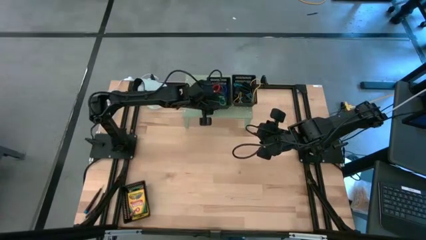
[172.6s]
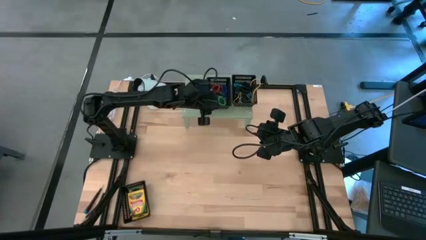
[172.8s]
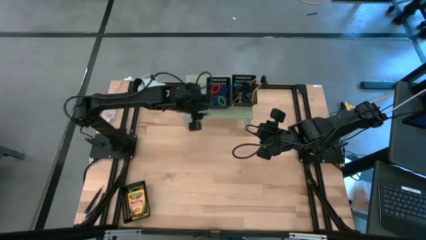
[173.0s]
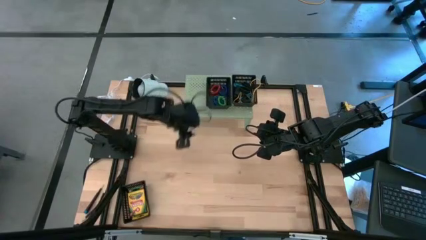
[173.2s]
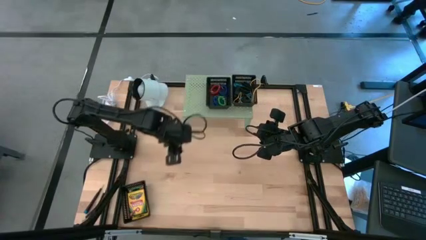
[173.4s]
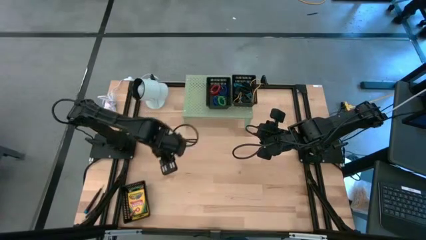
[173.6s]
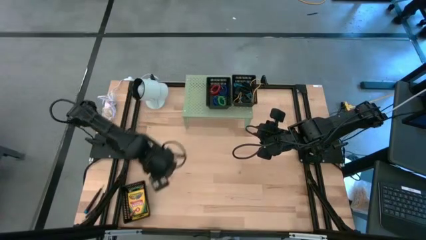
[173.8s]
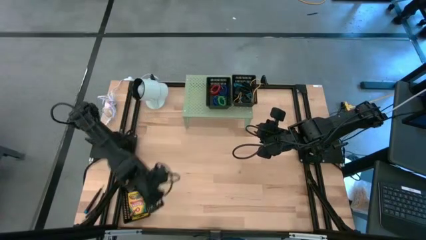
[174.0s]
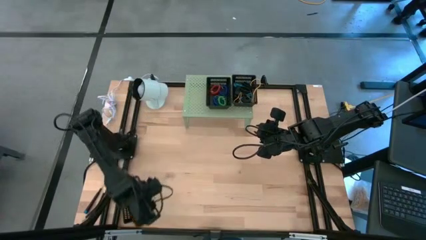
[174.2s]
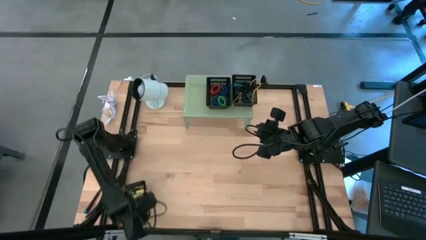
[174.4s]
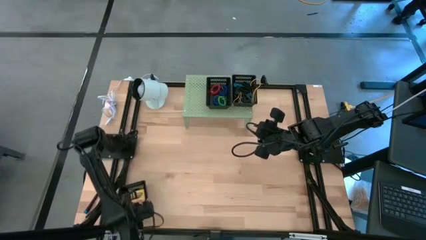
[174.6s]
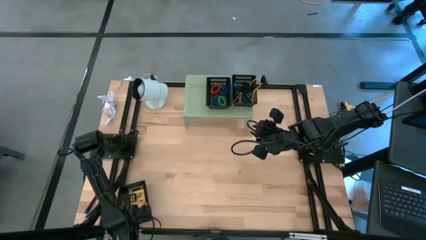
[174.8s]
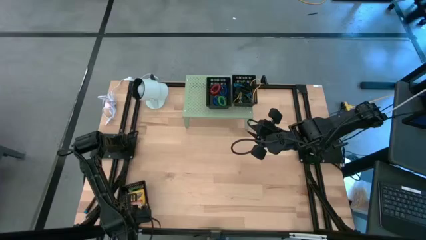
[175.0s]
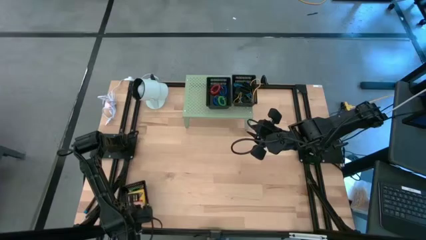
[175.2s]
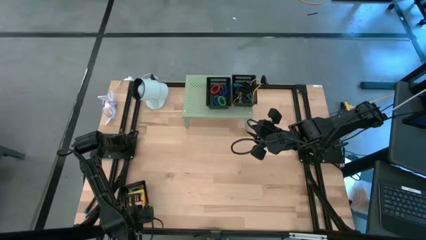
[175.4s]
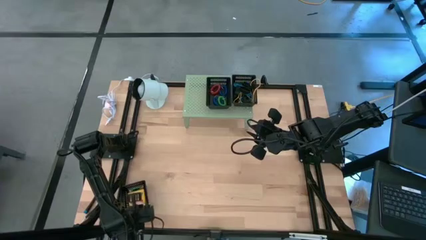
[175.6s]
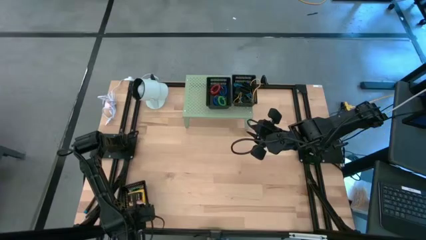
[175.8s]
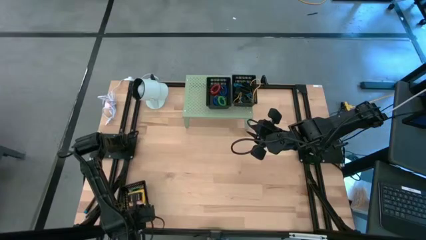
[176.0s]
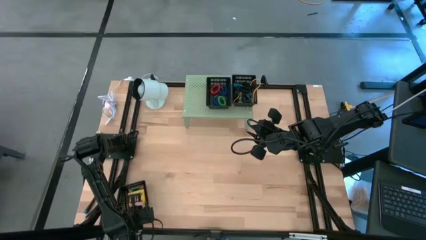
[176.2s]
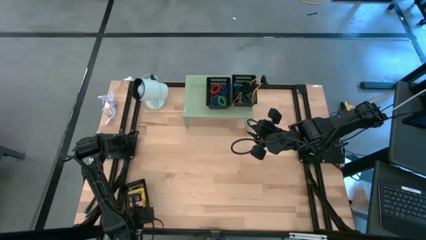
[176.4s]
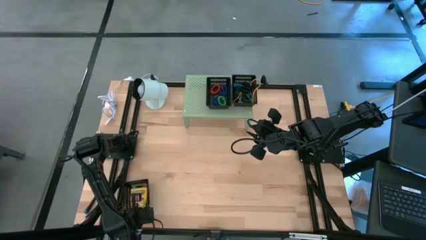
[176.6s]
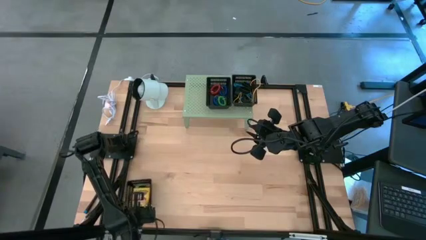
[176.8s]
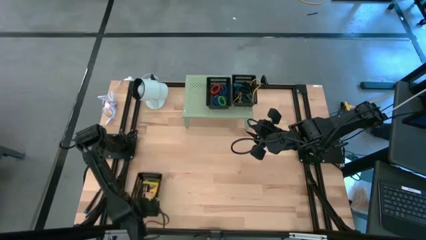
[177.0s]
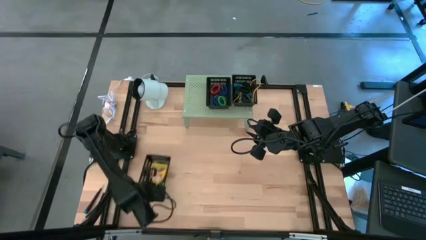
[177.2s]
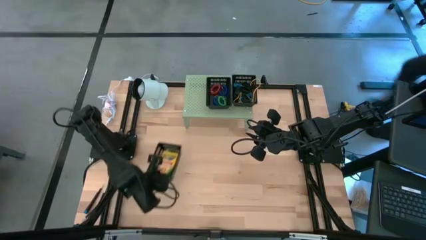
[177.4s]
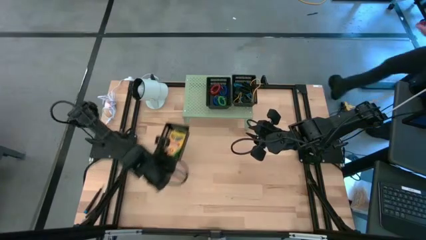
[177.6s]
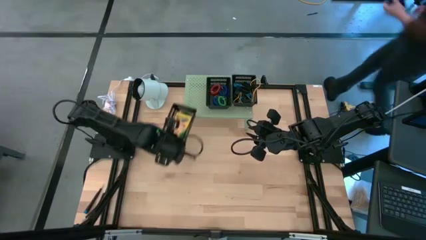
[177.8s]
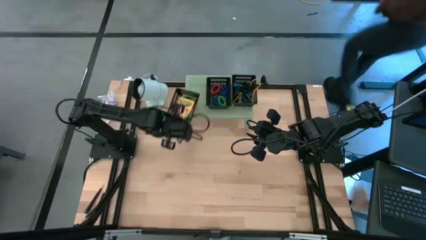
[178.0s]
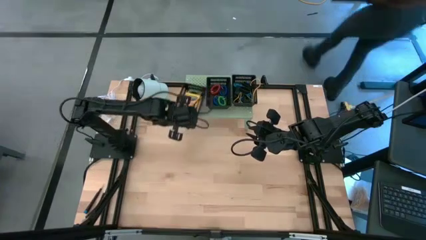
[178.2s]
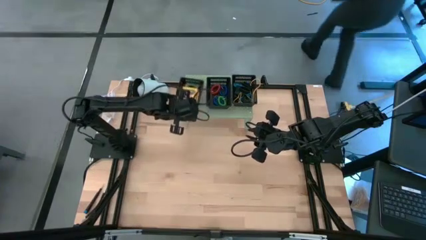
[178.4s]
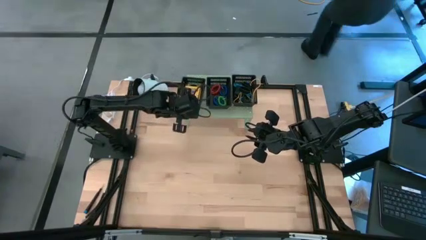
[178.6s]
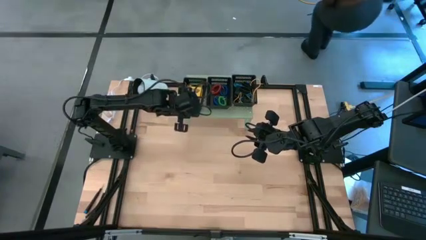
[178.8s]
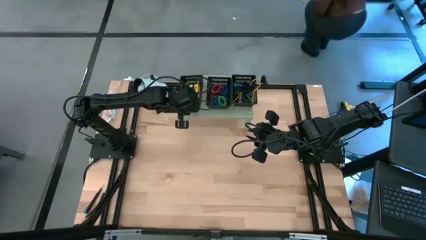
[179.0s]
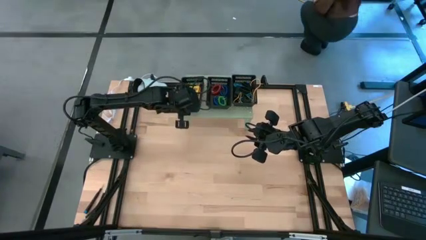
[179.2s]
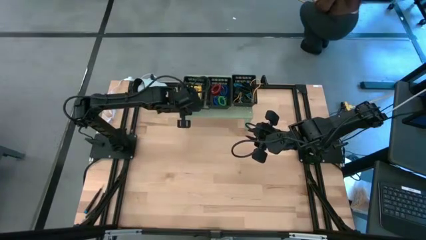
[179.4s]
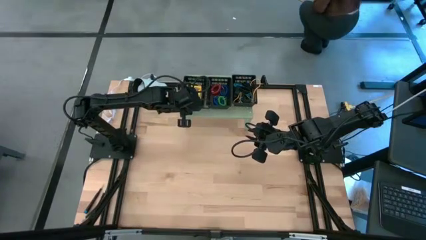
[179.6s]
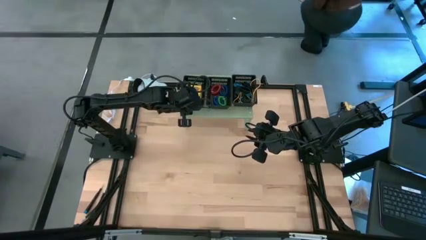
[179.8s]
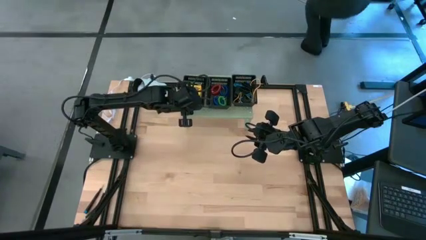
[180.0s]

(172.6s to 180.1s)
Task: Pick & Place Office Desk Supplies
Put the black bin on the shelf

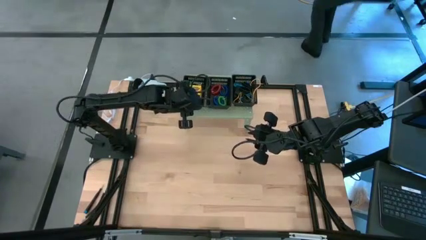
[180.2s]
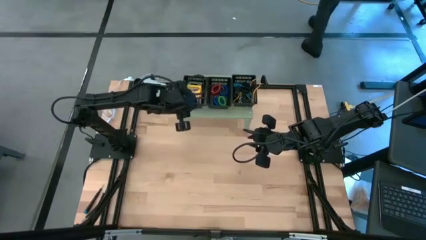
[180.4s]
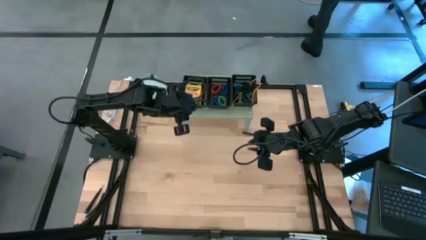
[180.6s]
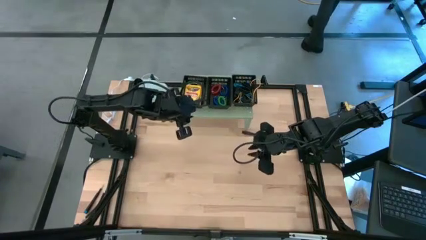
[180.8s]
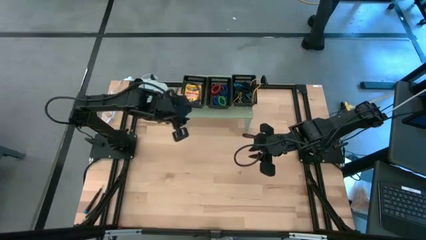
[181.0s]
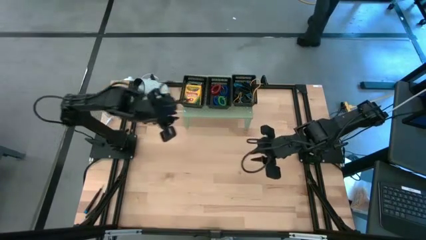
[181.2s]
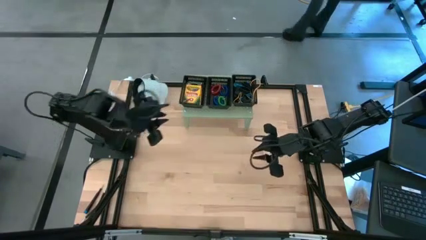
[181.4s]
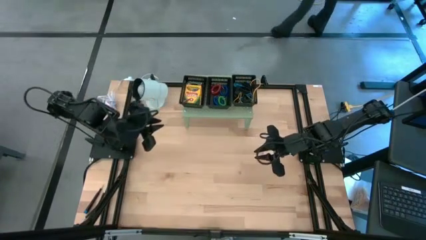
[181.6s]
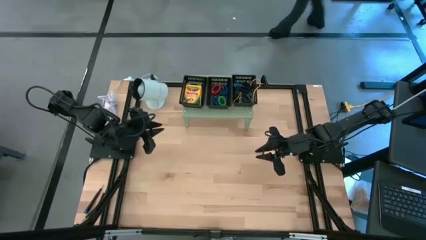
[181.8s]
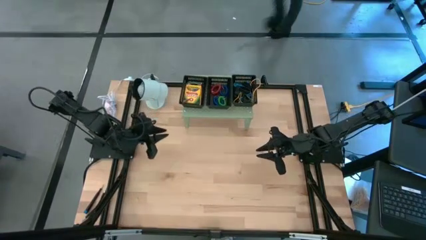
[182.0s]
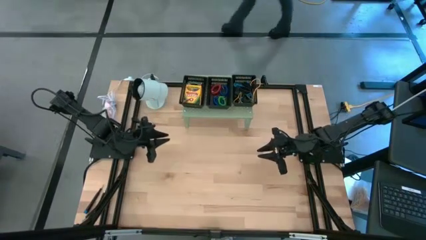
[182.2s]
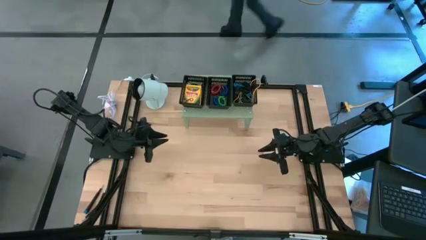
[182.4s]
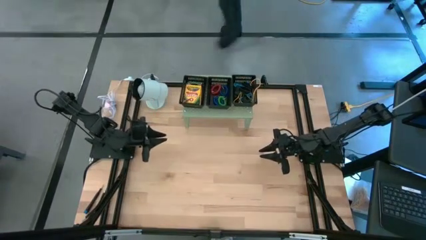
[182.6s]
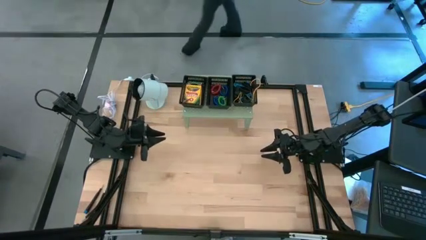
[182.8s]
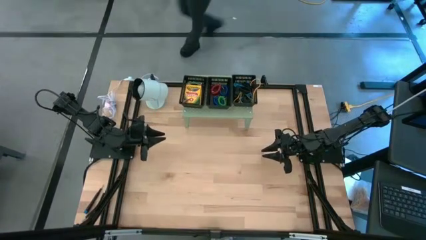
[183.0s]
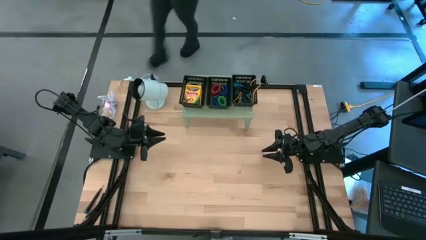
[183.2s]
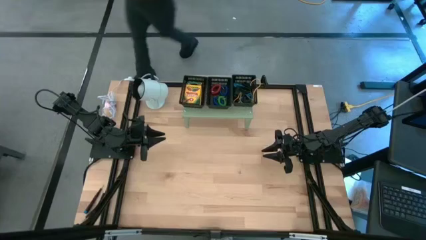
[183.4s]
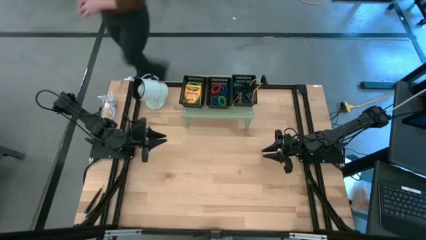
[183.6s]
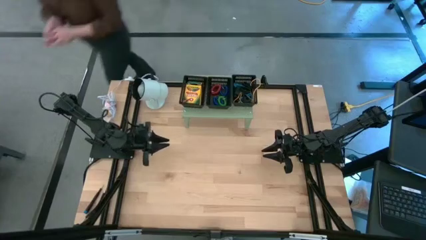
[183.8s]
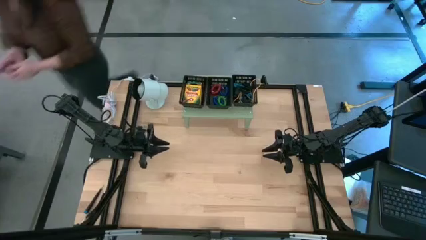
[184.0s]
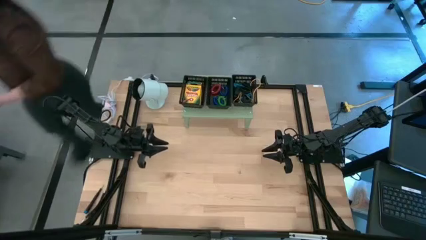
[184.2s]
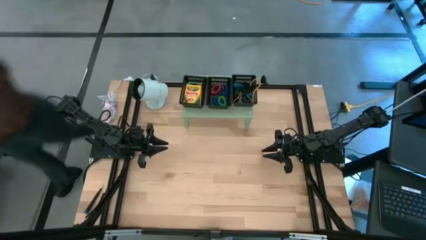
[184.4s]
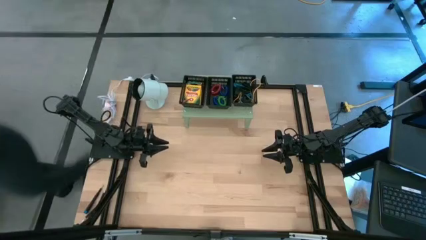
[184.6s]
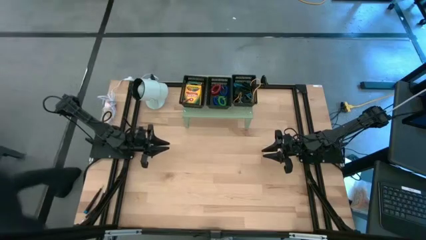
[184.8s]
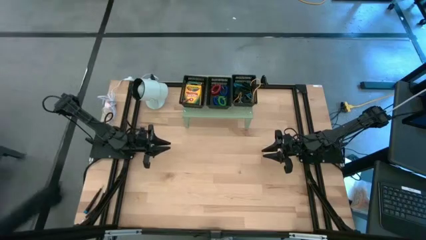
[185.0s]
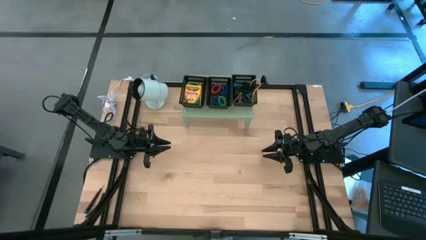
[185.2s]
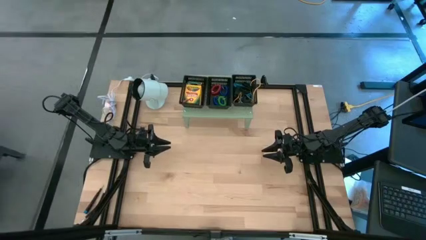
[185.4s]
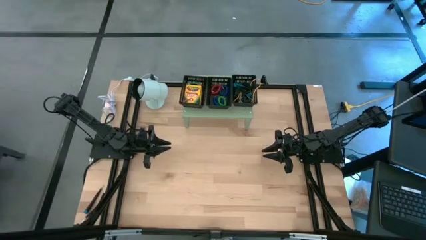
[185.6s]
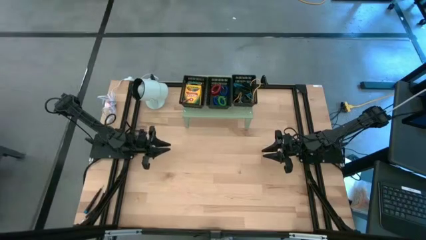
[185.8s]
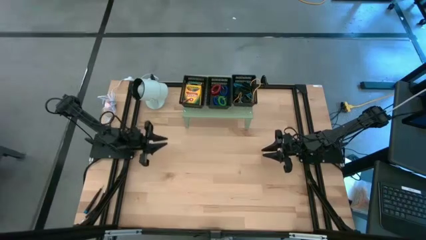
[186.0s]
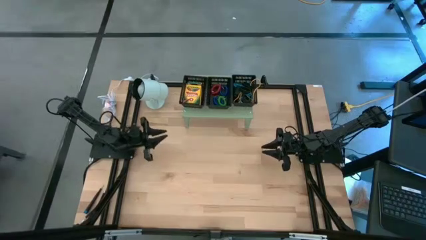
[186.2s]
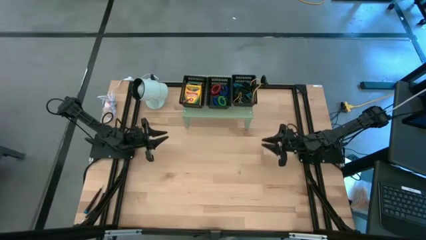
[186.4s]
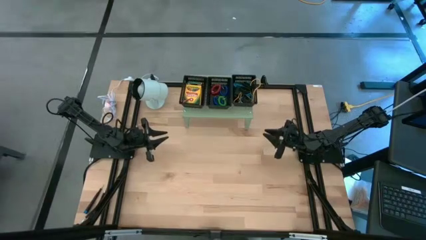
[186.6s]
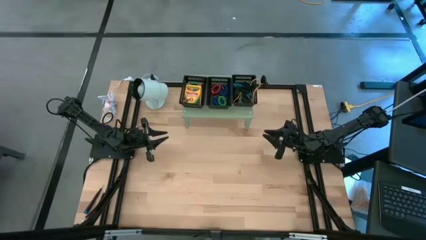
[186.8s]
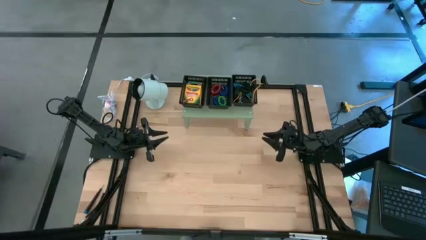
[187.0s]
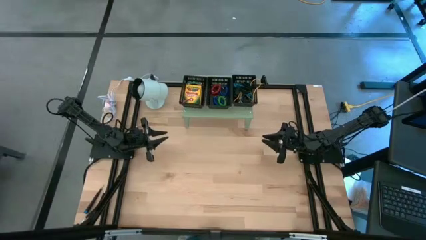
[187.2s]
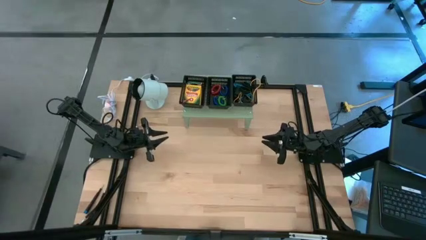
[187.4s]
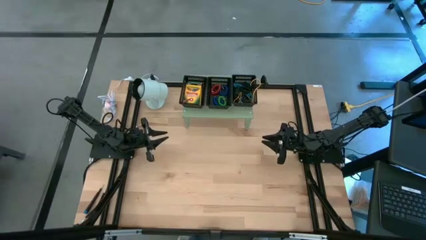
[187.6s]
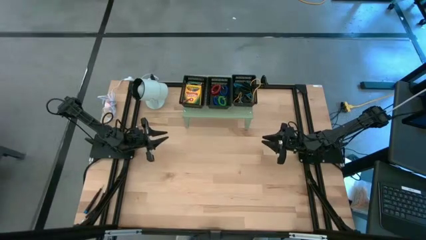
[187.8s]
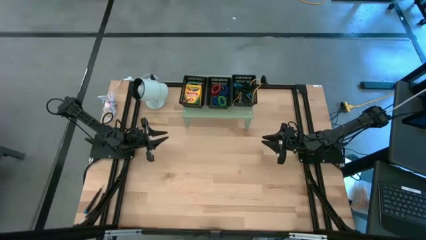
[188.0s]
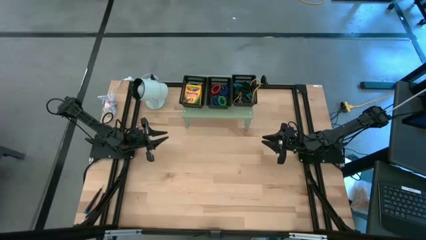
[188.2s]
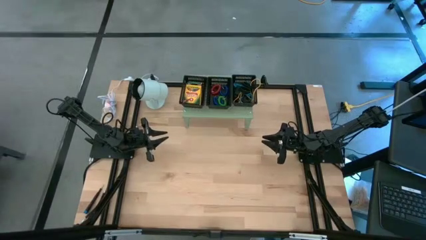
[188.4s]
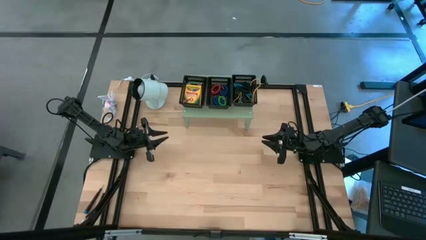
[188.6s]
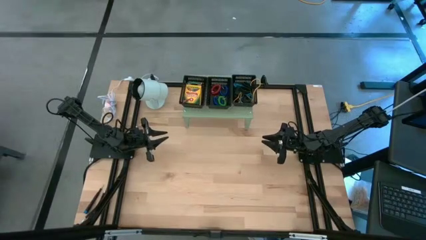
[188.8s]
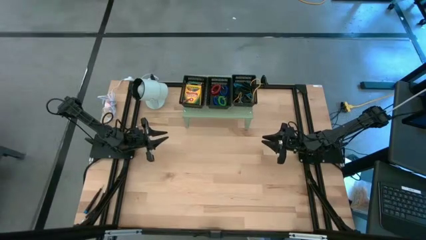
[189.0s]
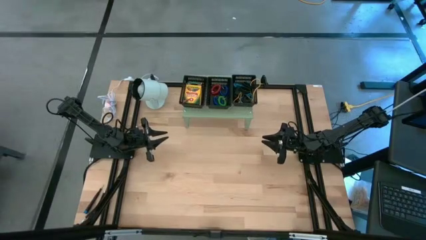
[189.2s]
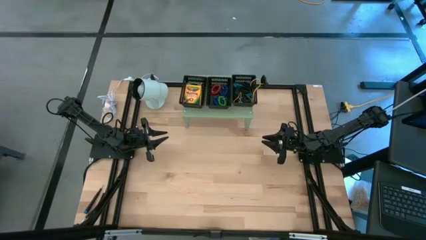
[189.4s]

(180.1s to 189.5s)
Return to Home Position
